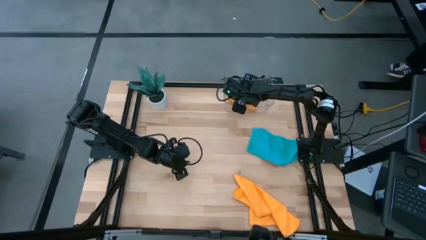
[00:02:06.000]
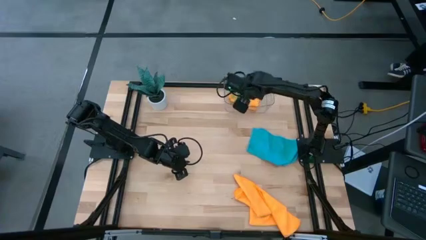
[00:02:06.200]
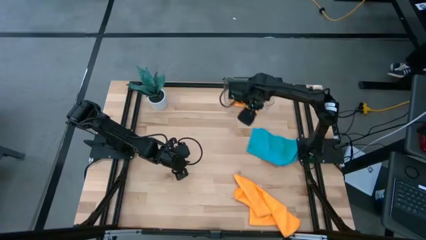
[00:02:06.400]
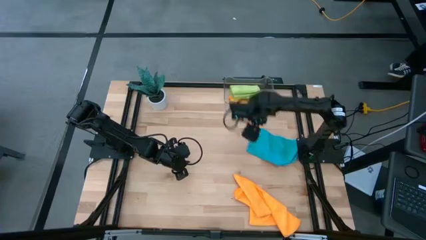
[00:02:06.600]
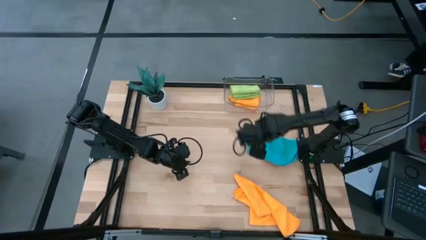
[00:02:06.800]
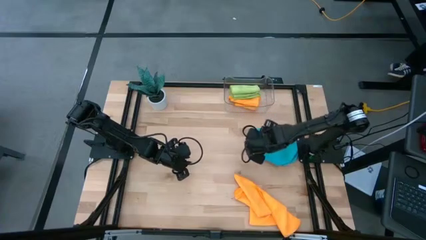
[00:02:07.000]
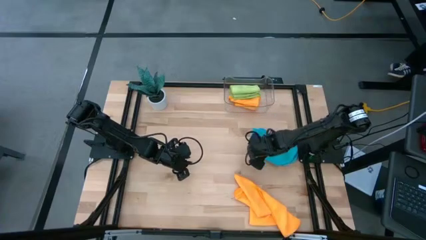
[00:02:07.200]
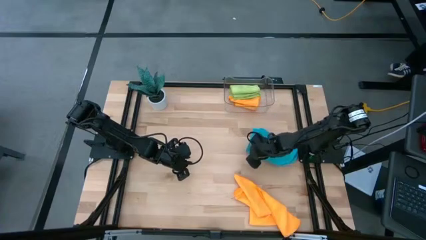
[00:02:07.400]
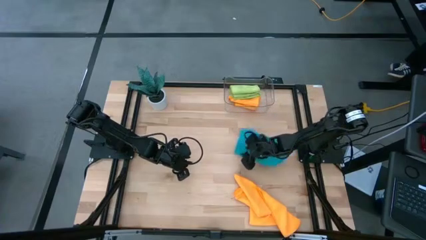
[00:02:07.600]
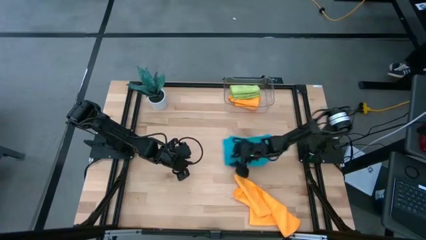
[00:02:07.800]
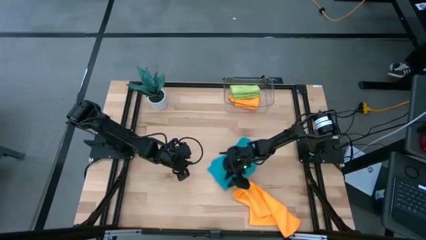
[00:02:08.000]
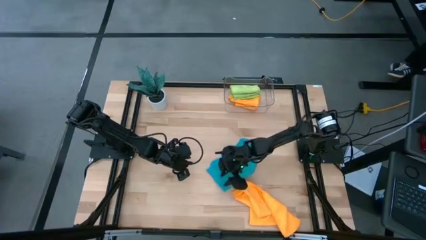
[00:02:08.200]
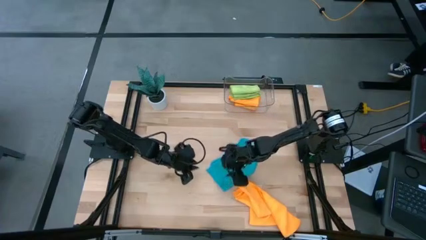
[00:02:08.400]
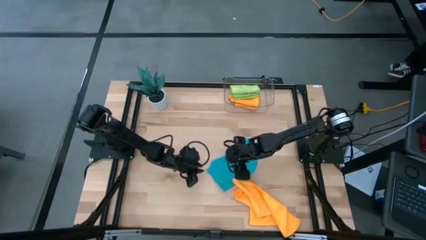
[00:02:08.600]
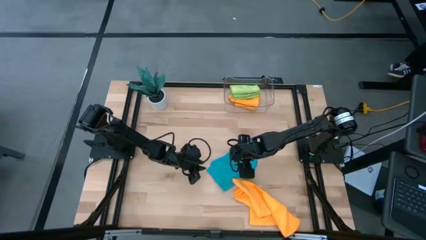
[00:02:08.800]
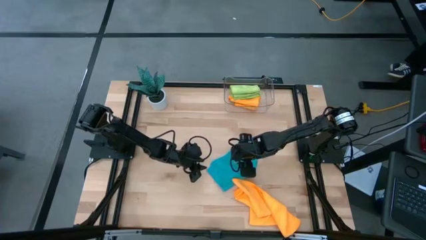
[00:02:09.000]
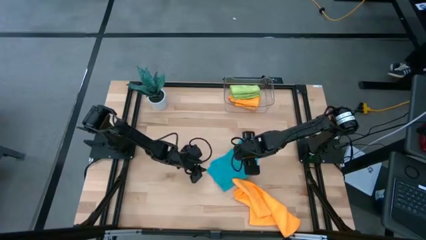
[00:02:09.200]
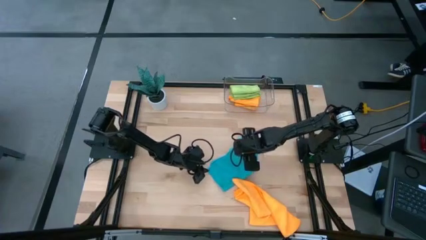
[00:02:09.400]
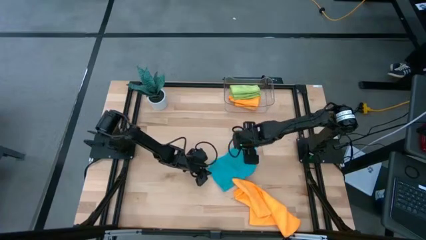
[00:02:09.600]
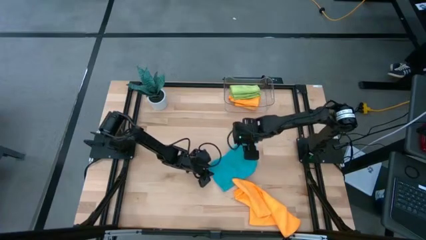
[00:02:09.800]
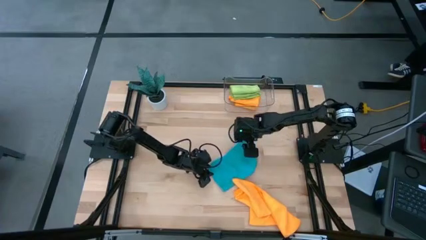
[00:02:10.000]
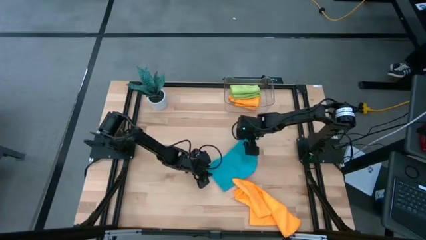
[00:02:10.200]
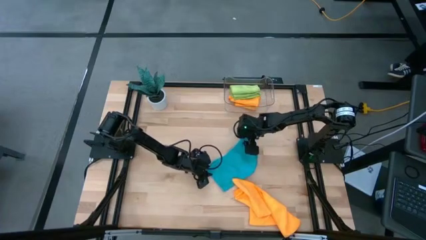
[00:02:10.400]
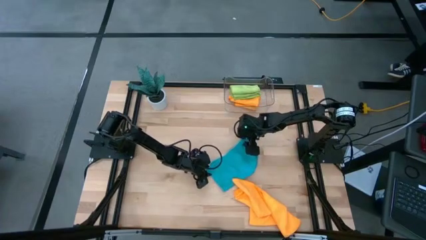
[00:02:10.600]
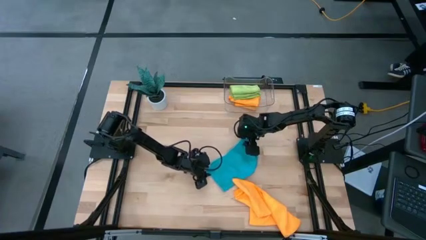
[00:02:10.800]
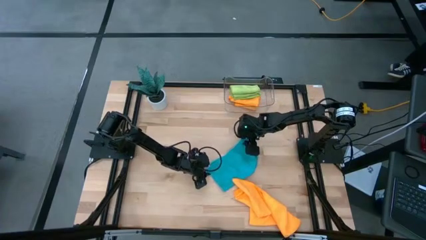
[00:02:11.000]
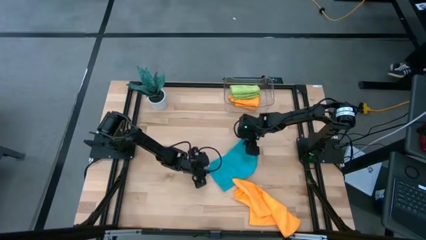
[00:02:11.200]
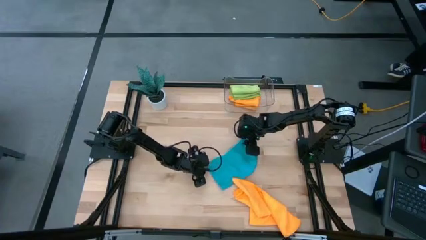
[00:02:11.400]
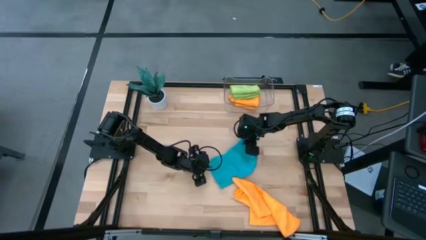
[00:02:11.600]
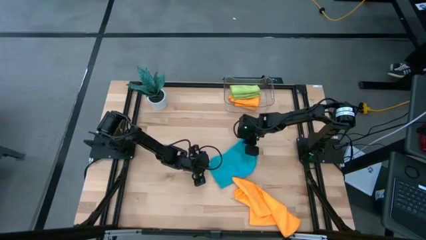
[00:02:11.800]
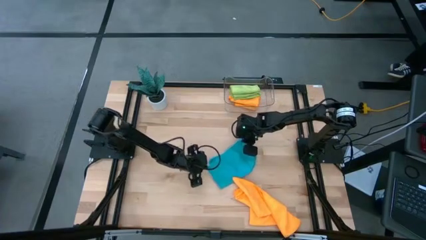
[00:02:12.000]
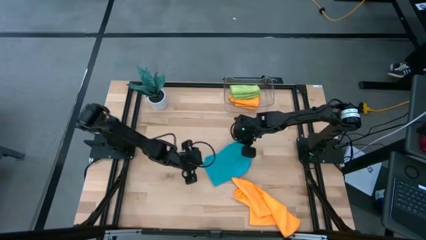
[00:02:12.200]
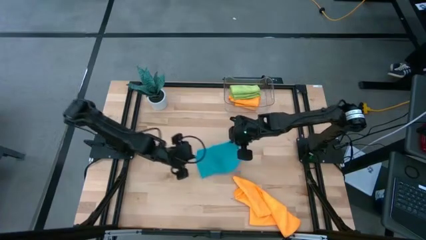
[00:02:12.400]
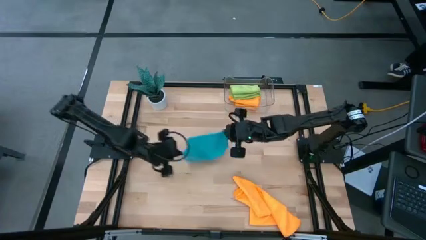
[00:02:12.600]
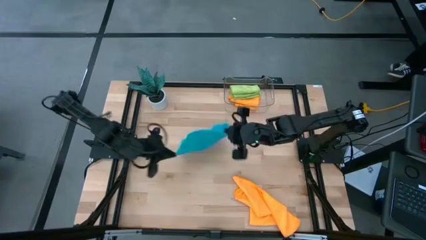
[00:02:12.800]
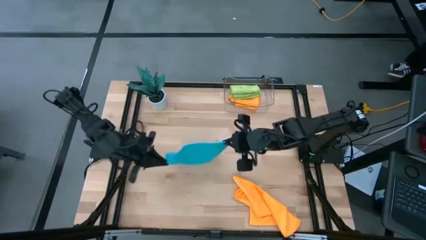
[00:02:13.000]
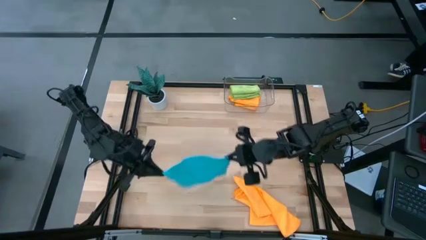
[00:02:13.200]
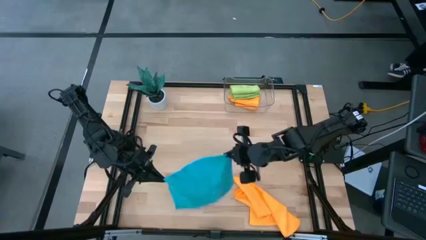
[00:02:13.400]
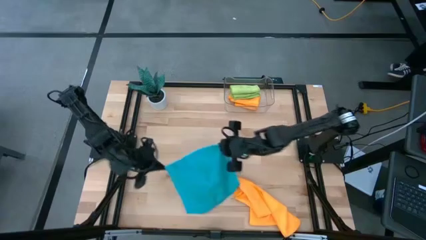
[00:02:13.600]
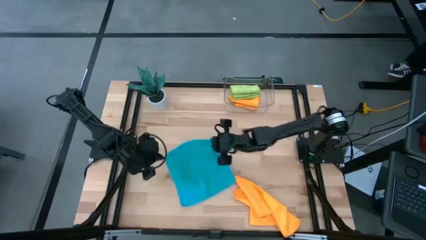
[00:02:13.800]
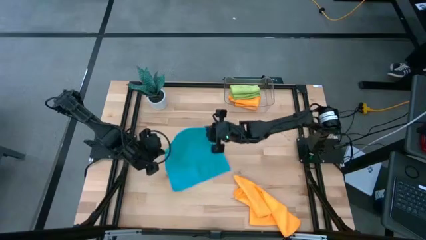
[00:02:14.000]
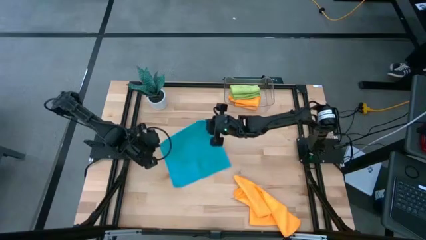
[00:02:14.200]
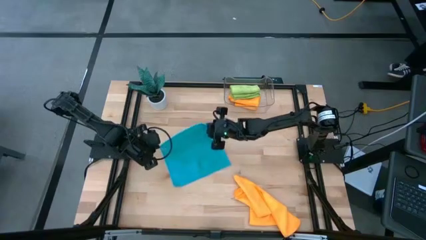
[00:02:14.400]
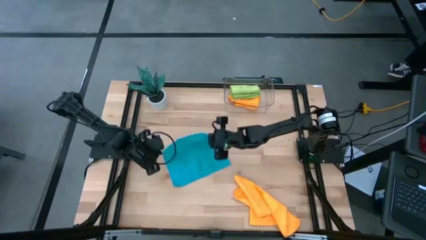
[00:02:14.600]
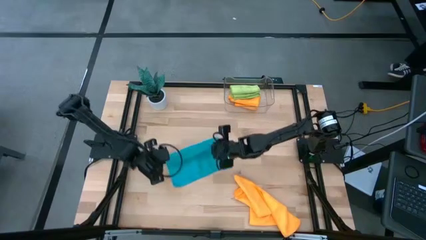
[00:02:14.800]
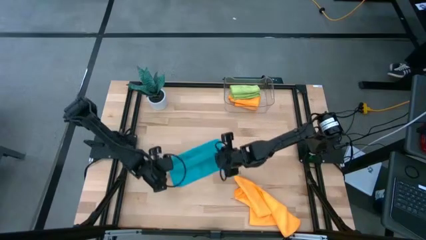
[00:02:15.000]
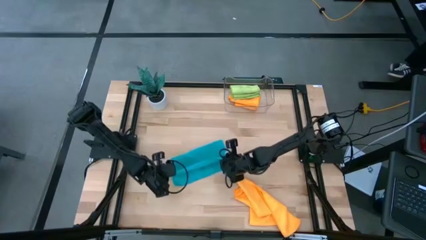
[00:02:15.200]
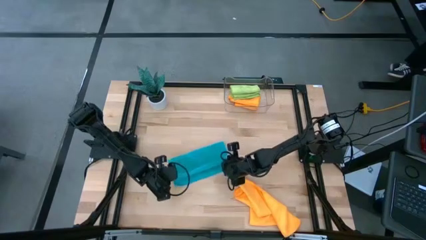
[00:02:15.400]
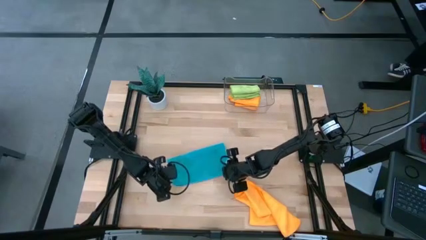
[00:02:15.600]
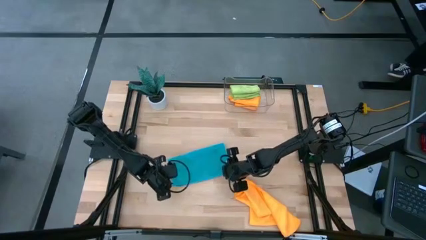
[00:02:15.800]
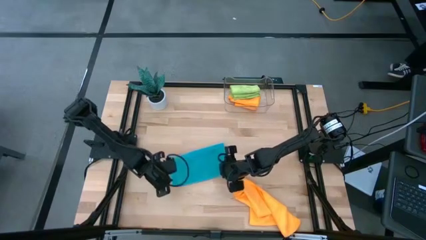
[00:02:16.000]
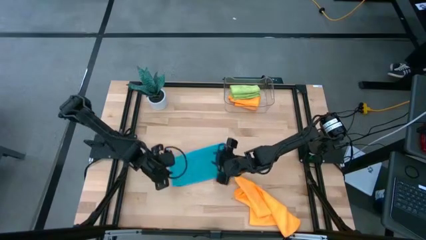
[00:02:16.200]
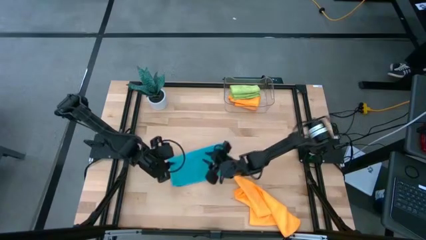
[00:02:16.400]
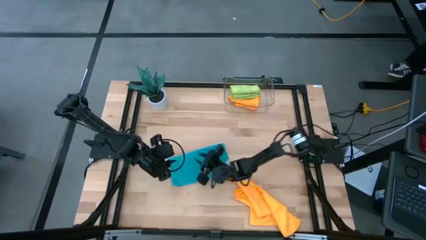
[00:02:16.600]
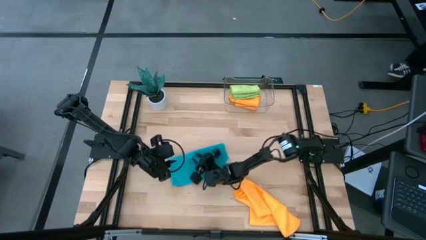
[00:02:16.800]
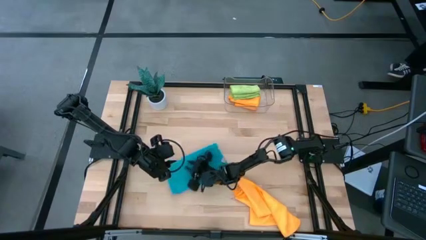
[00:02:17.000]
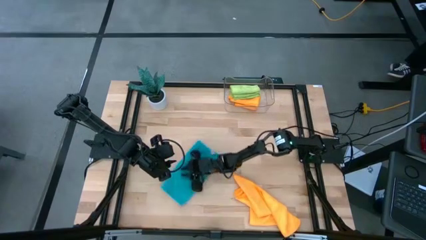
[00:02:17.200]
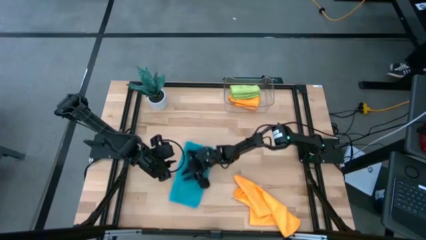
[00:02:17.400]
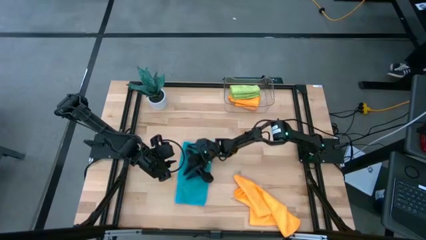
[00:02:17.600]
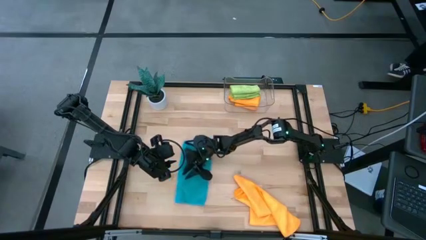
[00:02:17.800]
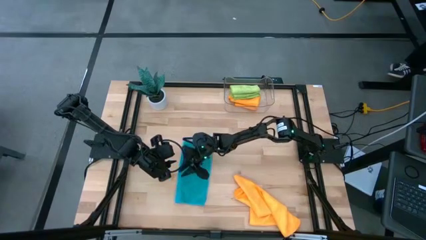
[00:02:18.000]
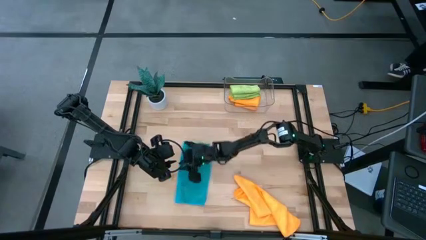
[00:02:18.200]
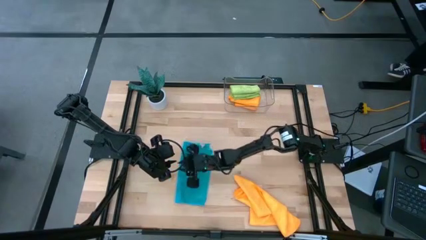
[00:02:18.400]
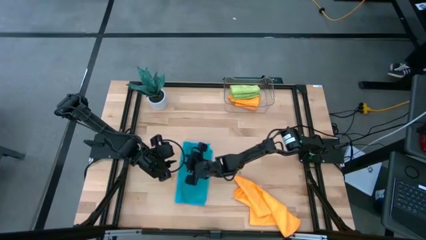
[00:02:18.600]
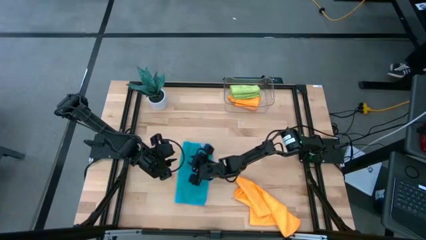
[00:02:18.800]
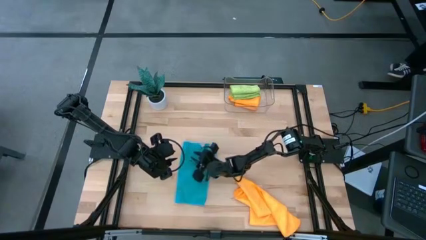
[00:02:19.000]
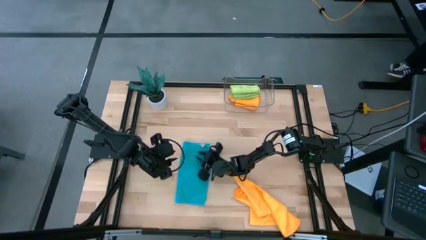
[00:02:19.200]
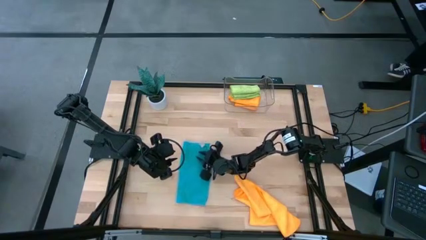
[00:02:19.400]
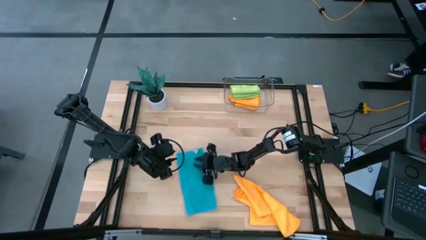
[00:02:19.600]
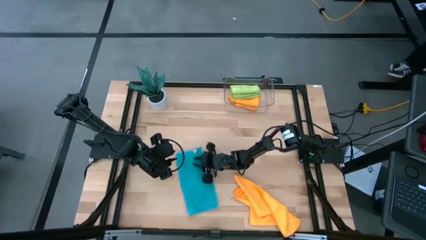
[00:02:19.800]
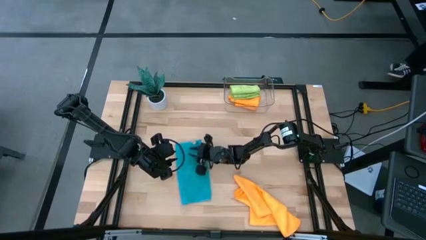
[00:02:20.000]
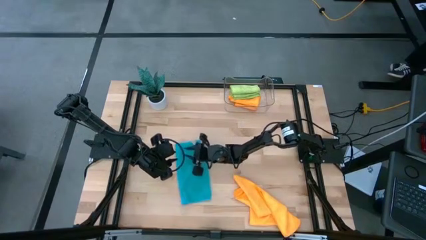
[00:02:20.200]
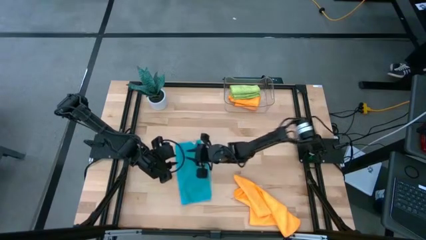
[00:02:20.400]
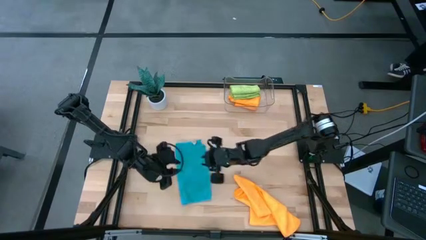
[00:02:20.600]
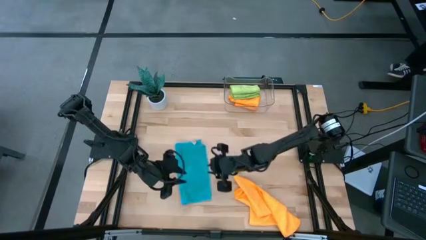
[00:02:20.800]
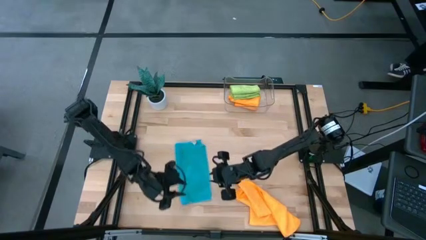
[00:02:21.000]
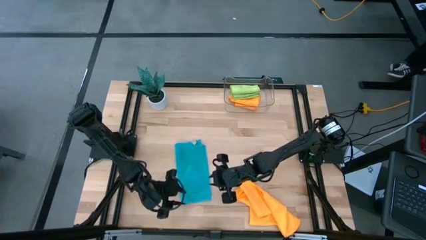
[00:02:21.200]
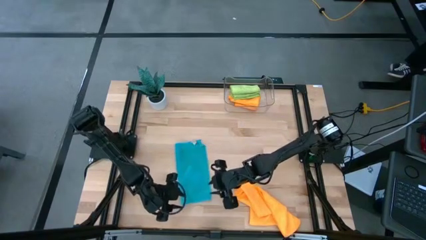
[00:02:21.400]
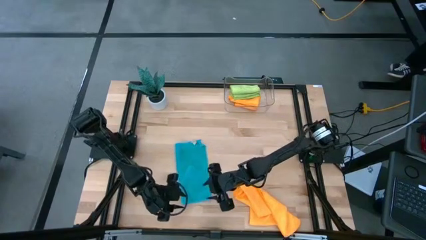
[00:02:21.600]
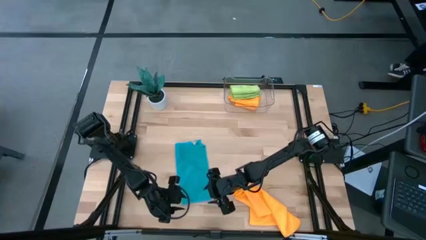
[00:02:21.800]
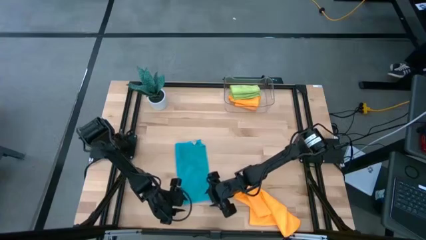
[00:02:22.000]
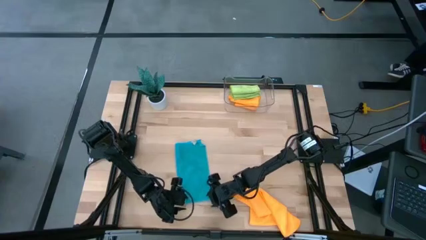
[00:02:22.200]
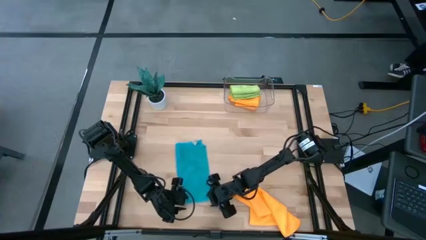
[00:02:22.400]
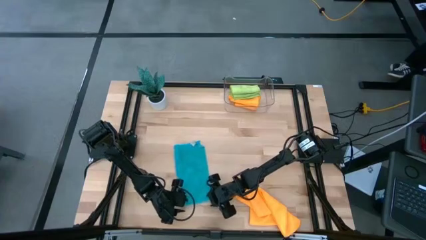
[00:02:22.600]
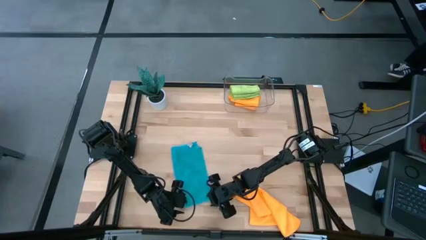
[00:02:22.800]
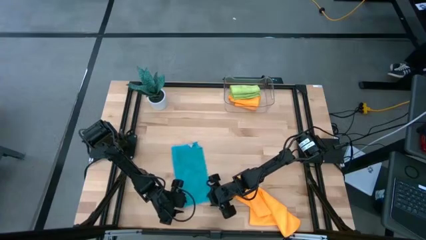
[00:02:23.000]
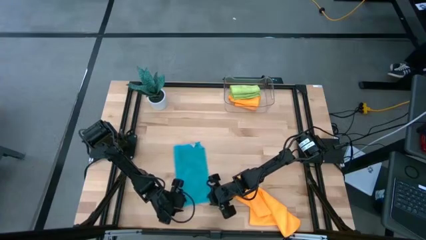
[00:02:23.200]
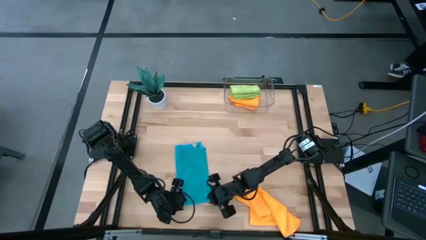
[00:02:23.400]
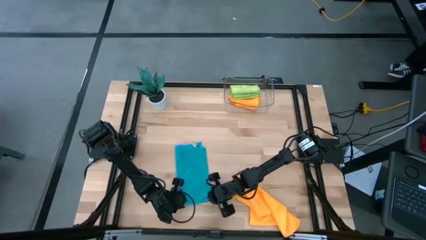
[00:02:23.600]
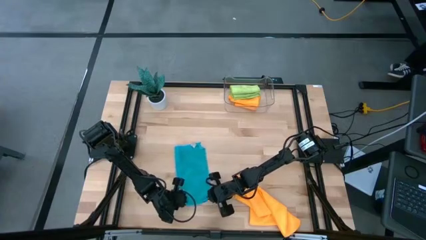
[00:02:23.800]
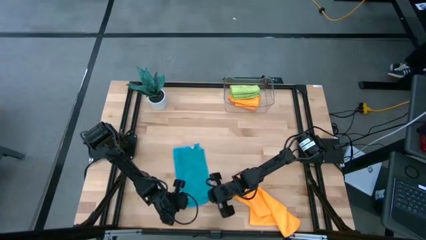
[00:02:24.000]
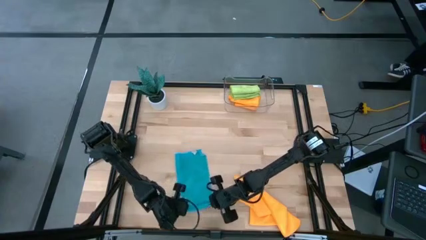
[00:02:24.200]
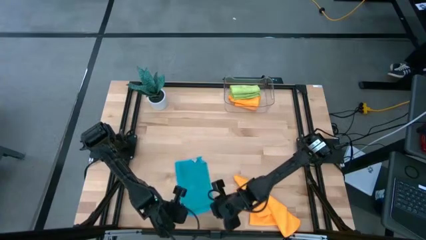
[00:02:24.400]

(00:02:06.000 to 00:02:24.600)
Task: Fold microfiber towels
Fold the blue microfiber towel
